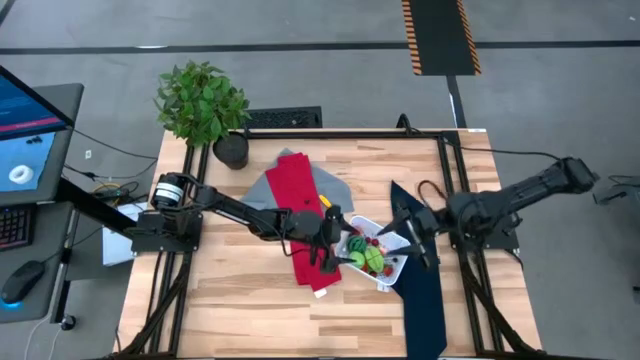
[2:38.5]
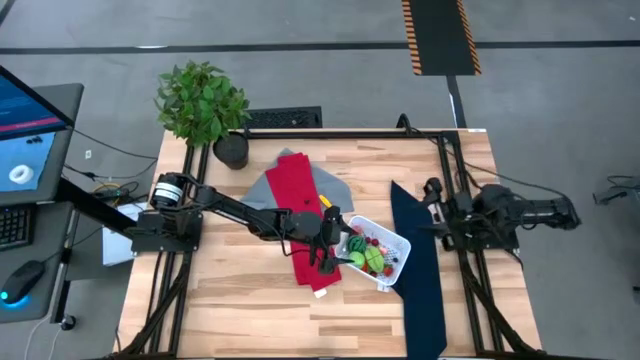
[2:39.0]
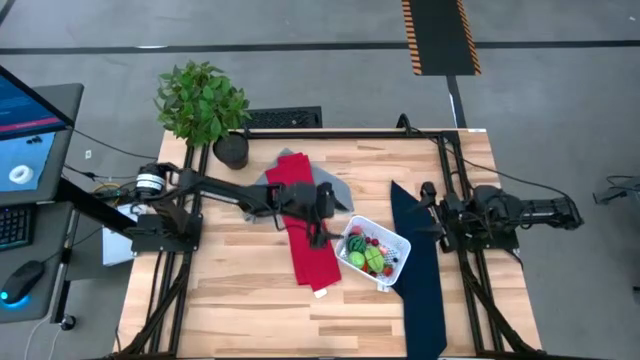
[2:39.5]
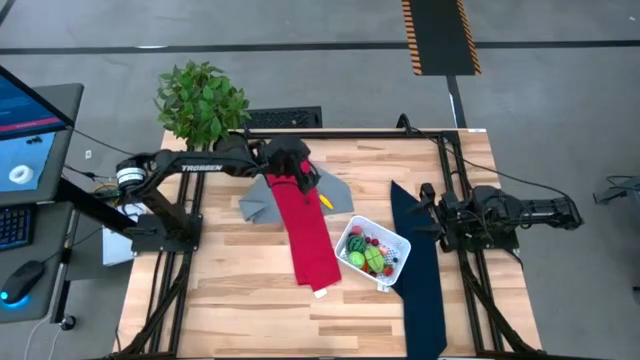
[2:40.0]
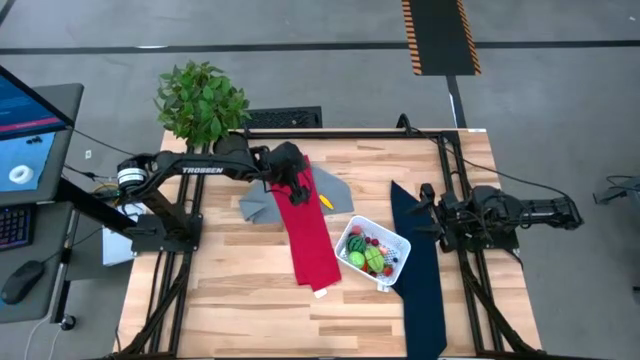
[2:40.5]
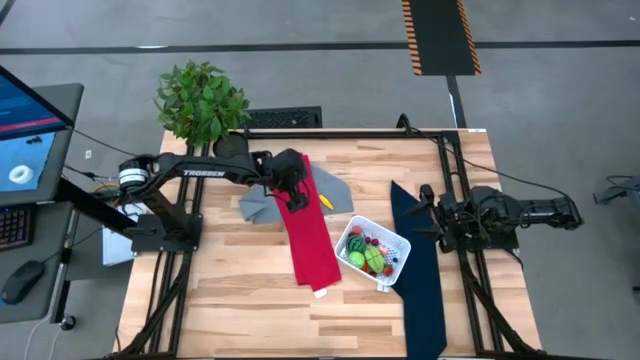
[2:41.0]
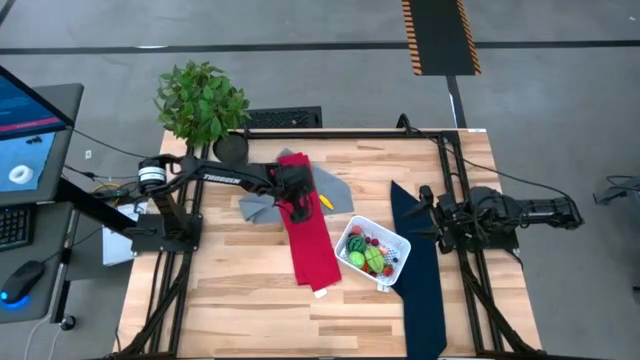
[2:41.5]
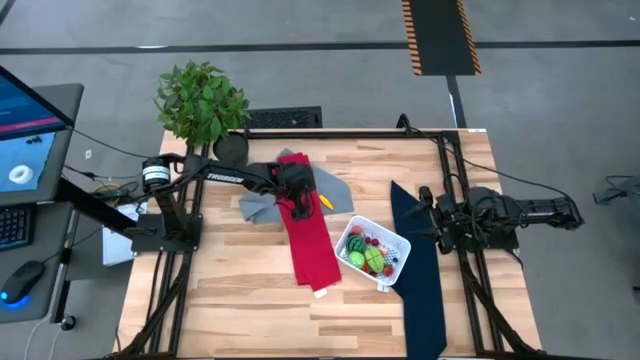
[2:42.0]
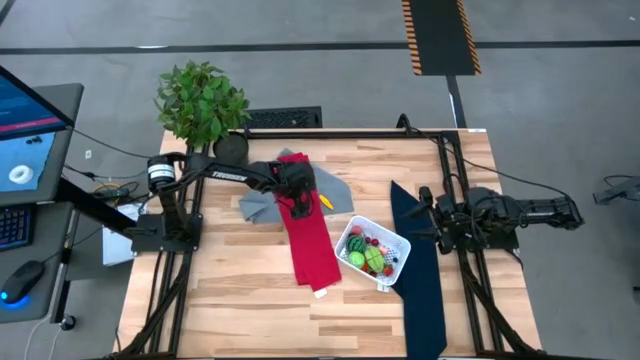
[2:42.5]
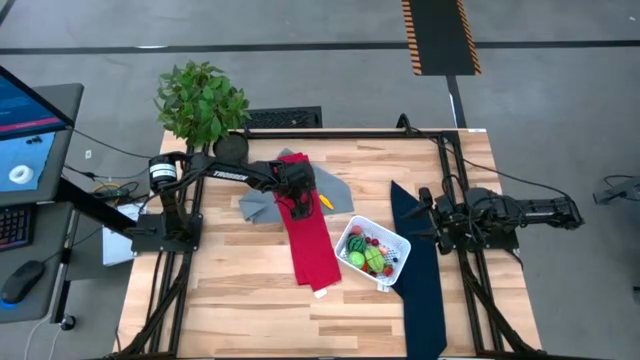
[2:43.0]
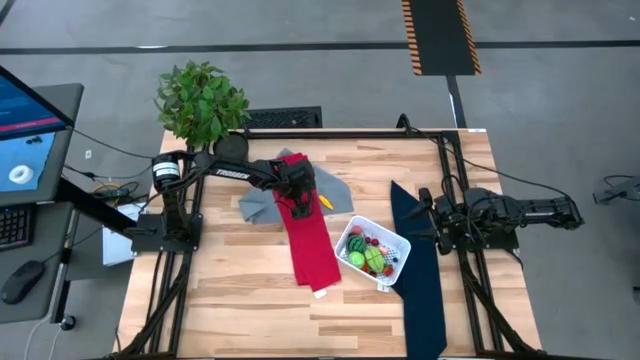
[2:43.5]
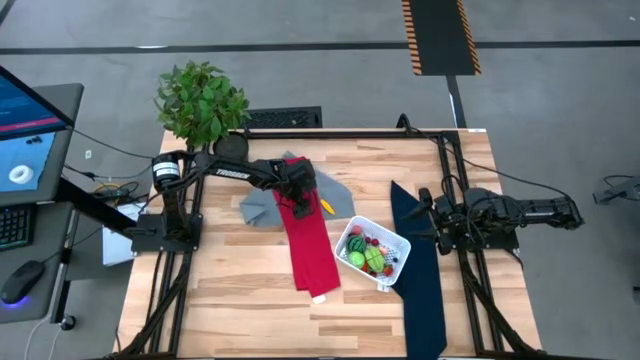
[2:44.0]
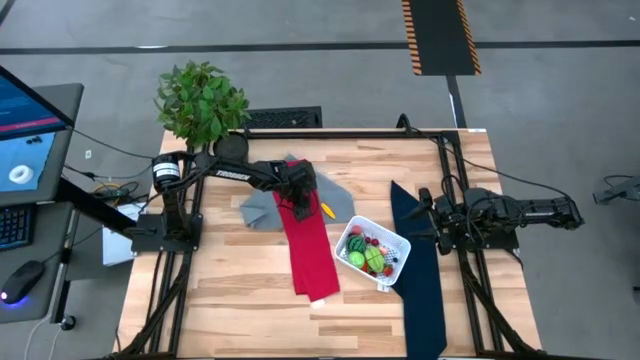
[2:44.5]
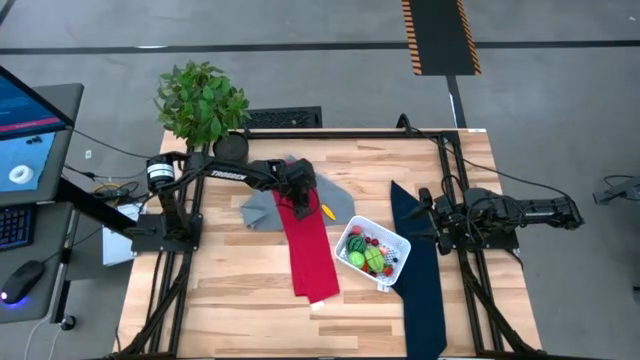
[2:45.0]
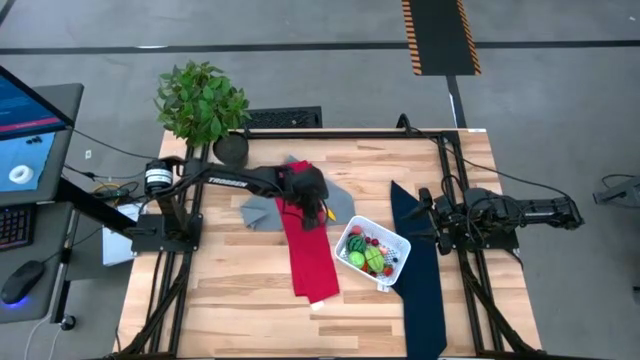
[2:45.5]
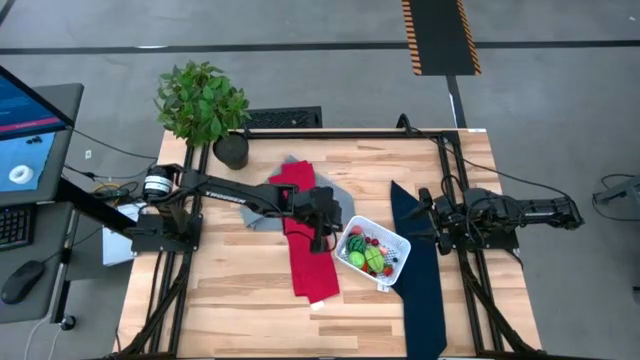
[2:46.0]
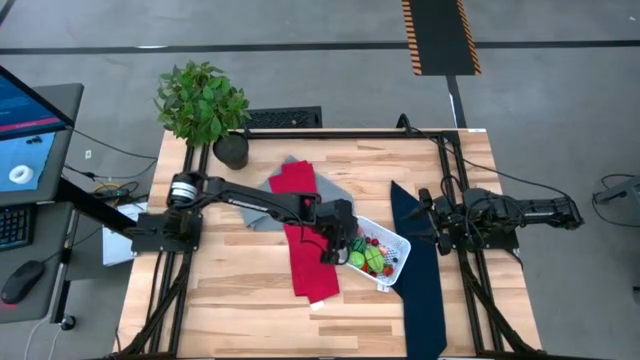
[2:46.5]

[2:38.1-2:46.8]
Task: Pick and placing Produce into tupperware
Put the blueberry into the white bin

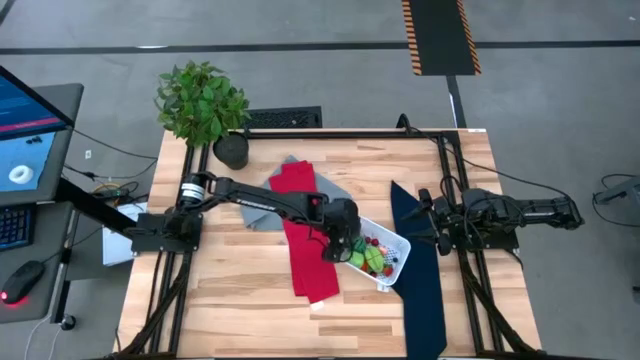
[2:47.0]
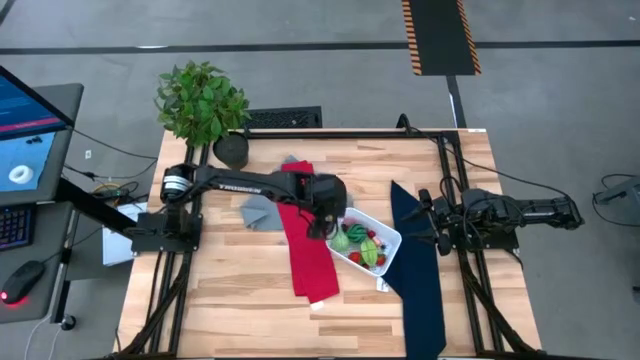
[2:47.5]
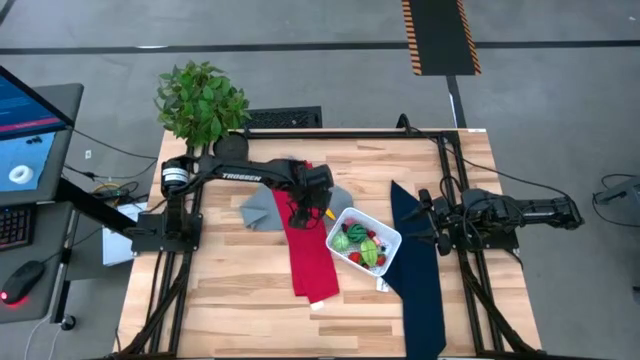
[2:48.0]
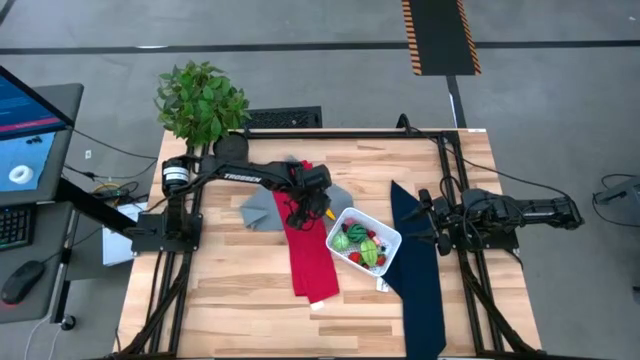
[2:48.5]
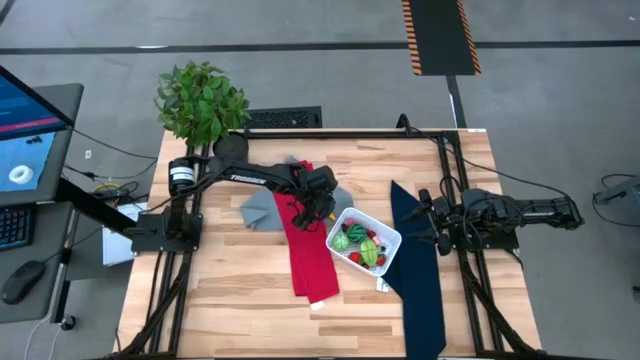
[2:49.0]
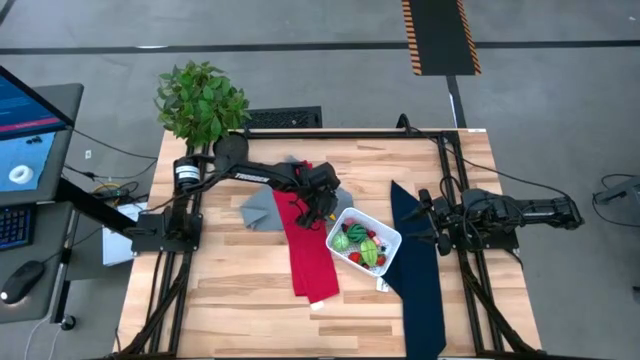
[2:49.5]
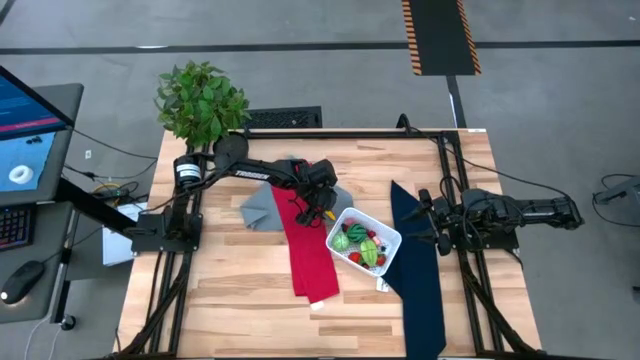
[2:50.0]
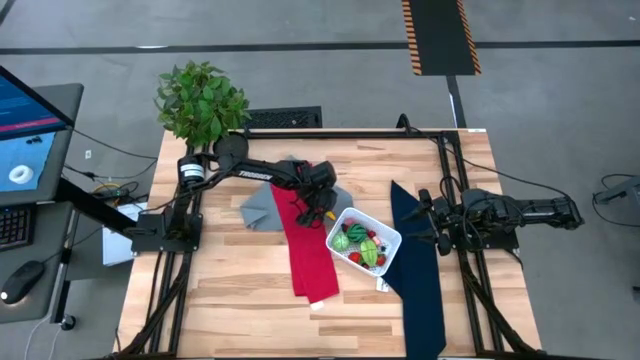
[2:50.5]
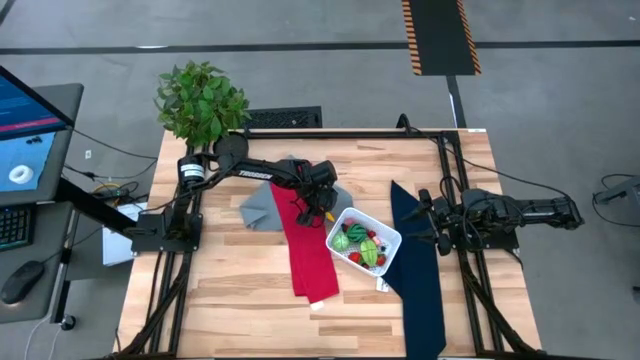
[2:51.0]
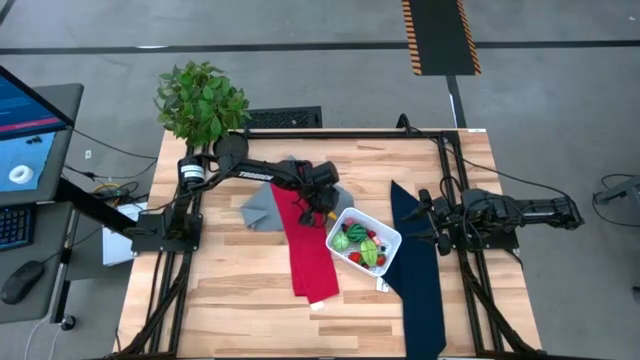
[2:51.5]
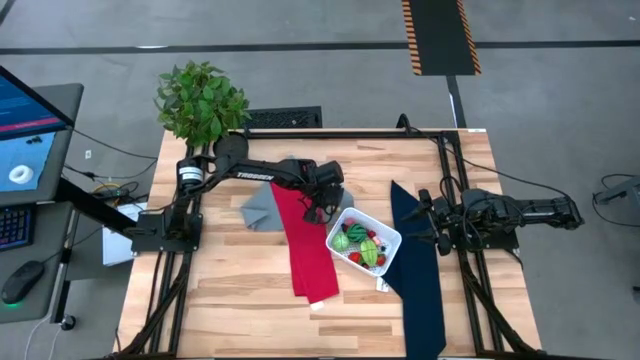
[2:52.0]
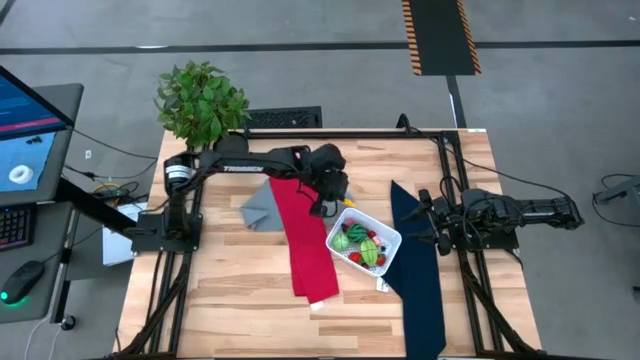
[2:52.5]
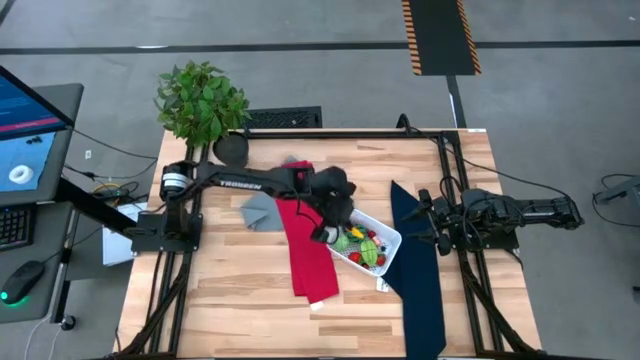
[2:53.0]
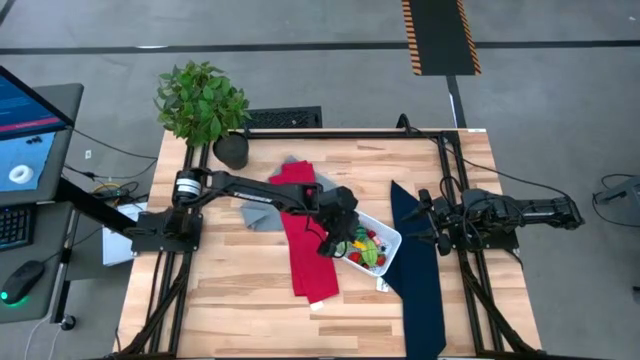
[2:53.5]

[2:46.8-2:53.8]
Put the corn into the white bin

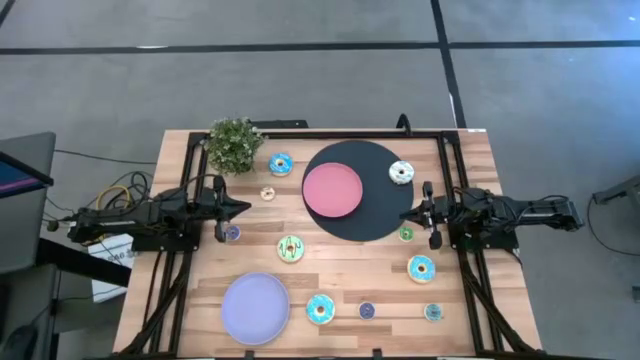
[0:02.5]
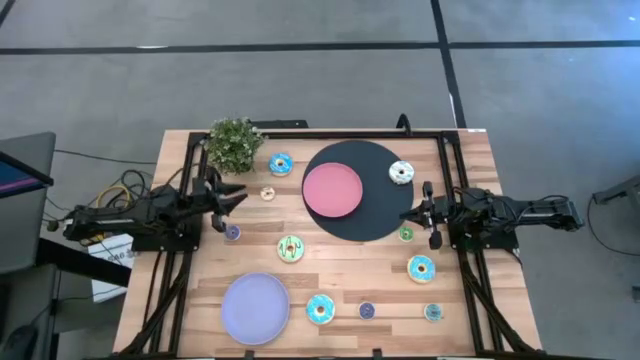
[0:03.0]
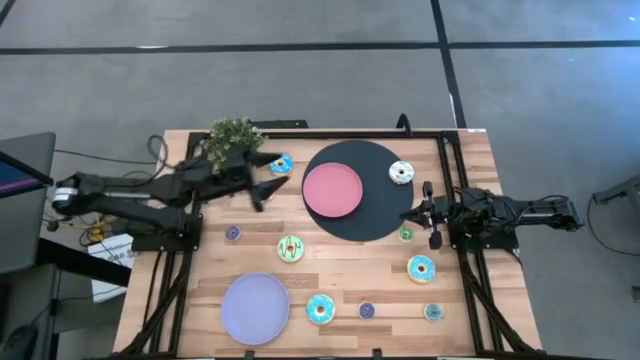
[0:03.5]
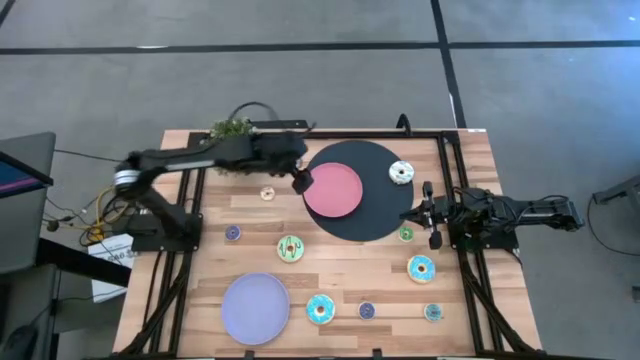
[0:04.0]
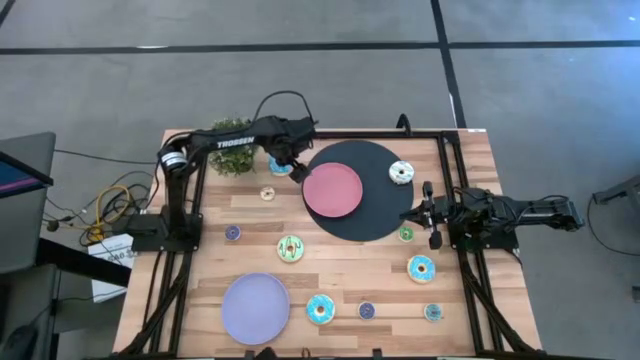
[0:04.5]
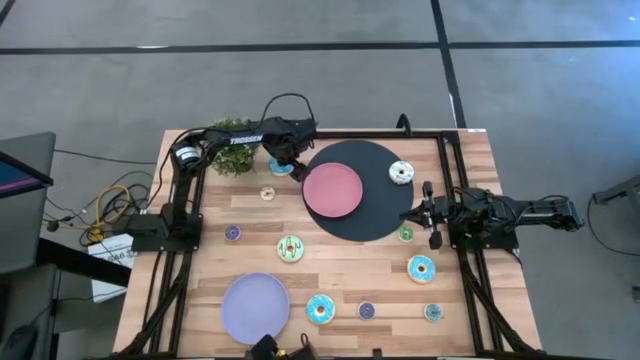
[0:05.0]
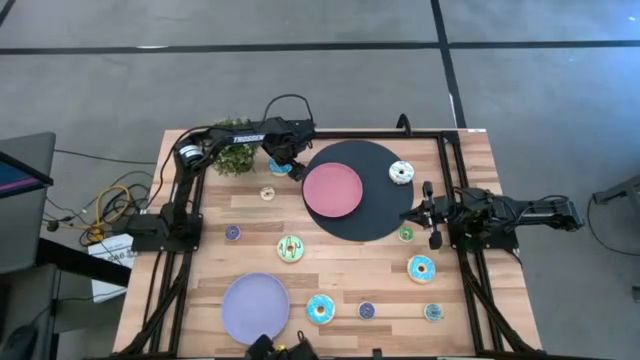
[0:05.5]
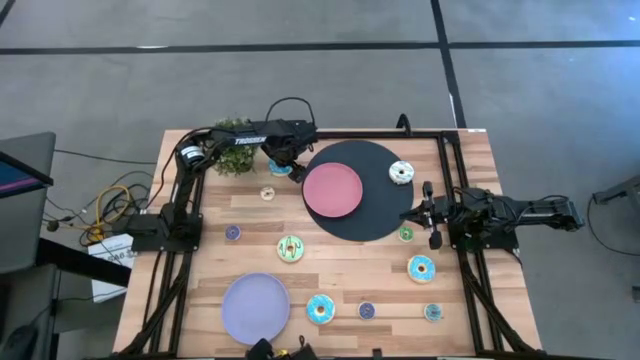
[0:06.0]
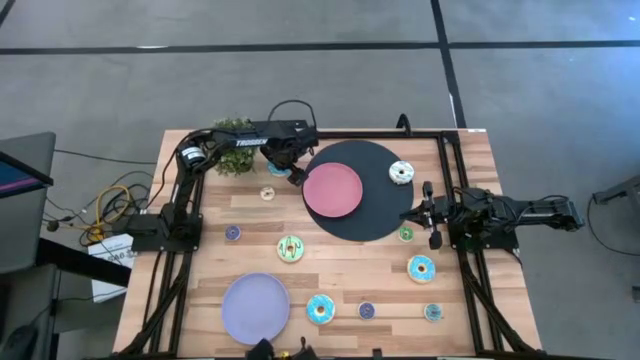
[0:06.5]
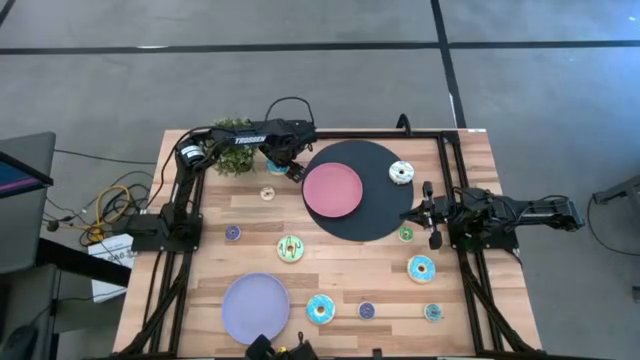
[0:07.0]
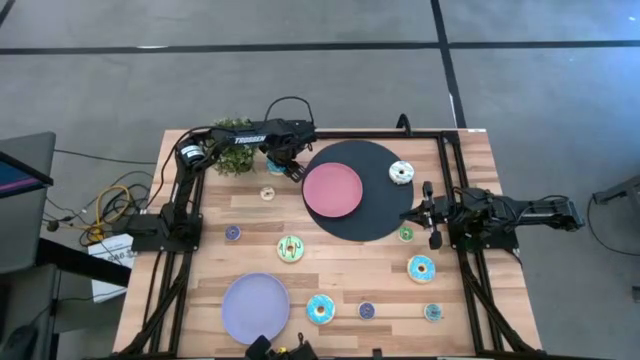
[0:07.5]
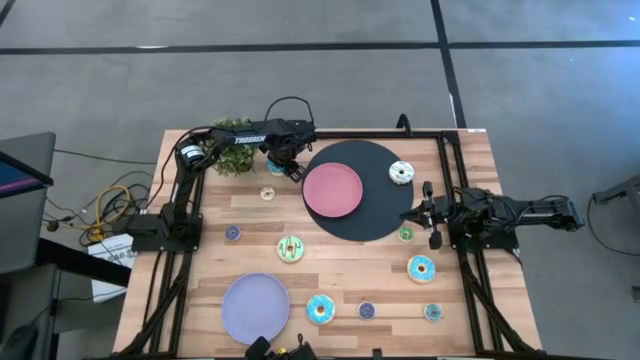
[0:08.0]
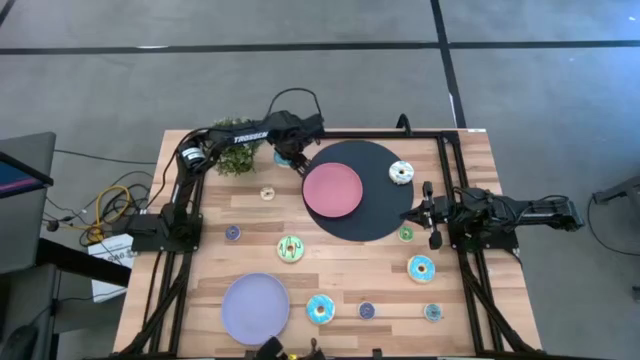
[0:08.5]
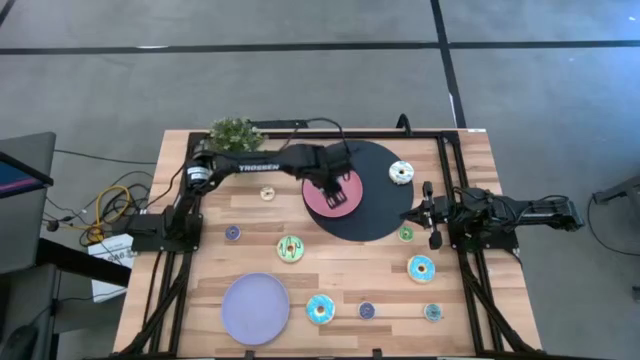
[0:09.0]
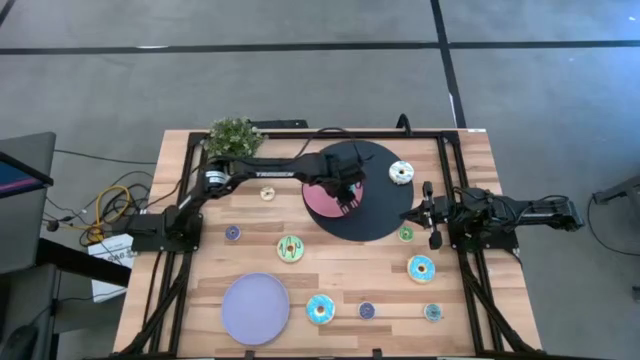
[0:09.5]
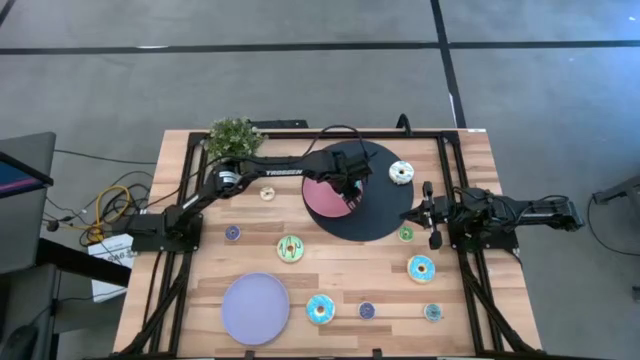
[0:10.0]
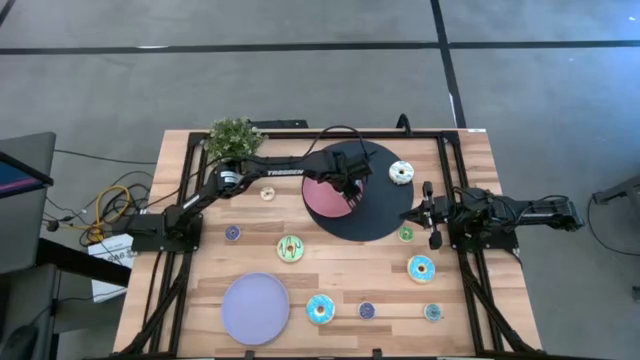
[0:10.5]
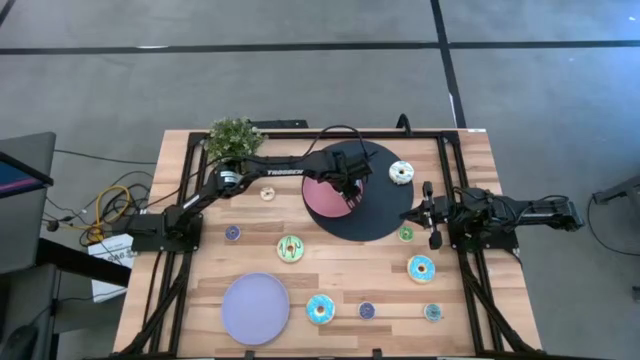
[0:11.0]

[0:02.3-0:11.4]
Task: Pick & Place donuts
Put the big blue donut on the pink plate
